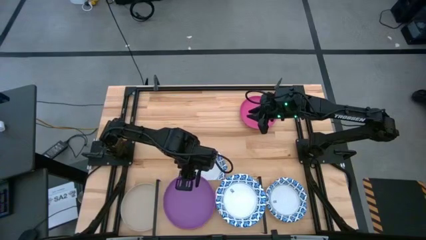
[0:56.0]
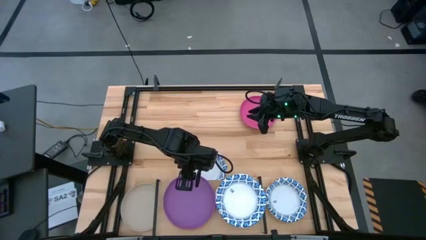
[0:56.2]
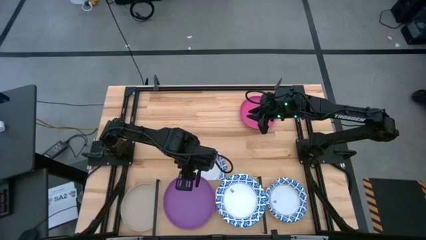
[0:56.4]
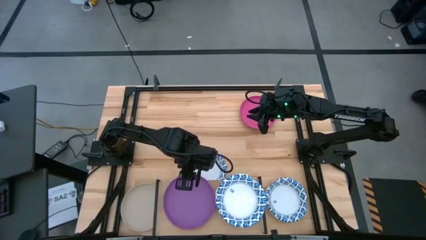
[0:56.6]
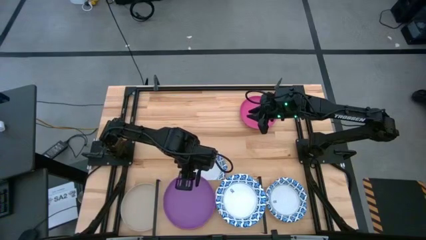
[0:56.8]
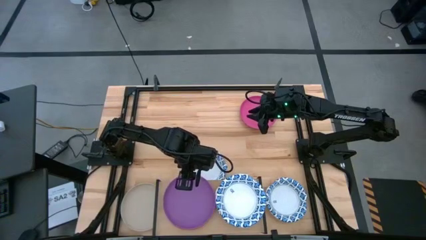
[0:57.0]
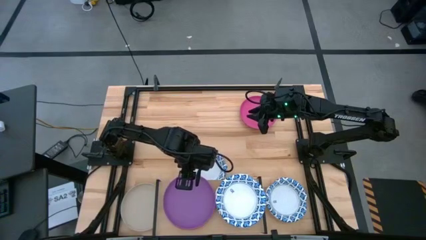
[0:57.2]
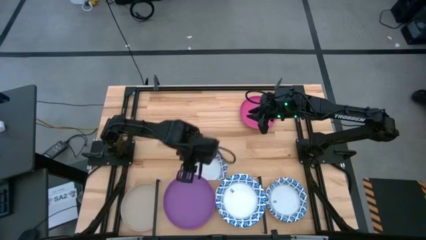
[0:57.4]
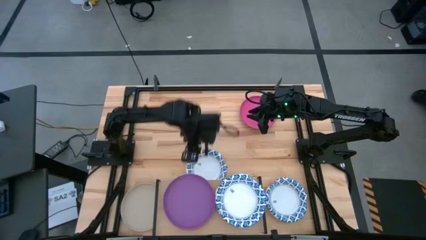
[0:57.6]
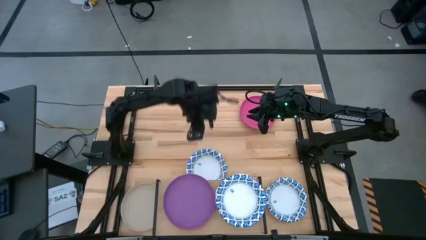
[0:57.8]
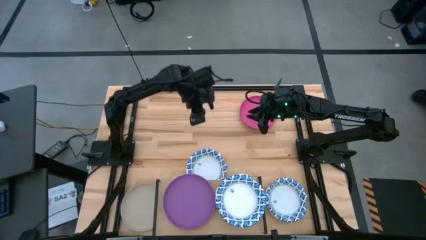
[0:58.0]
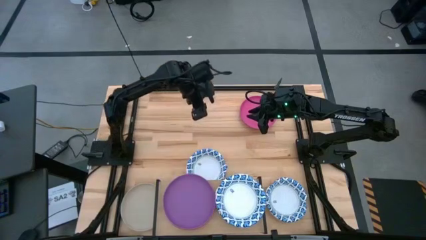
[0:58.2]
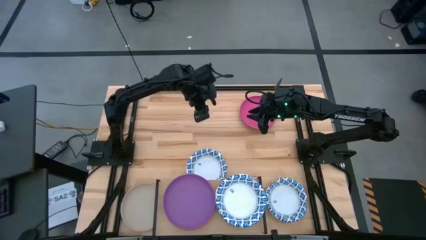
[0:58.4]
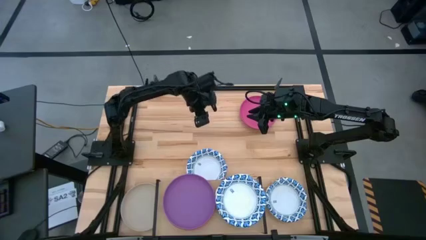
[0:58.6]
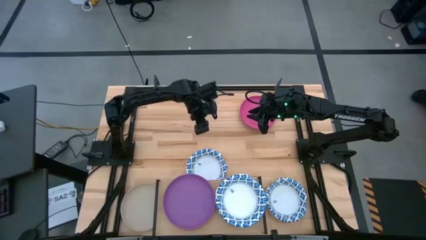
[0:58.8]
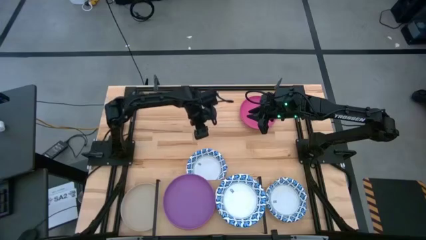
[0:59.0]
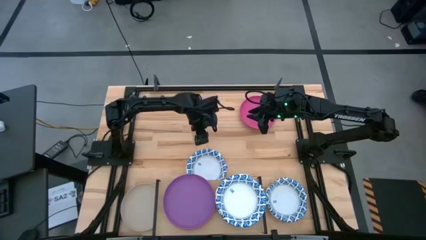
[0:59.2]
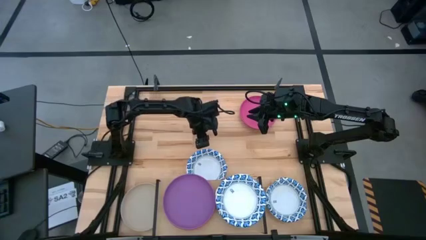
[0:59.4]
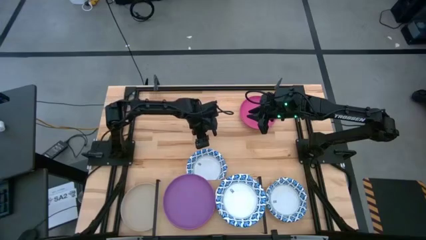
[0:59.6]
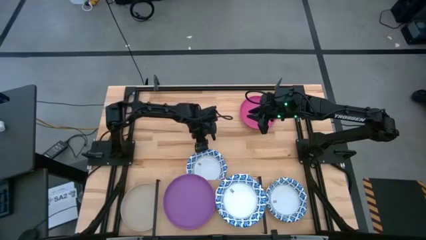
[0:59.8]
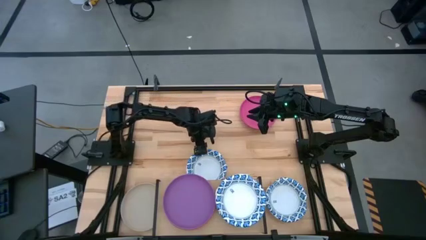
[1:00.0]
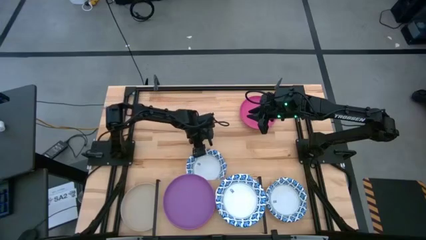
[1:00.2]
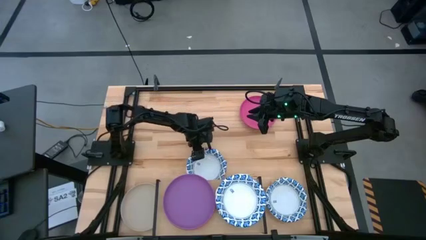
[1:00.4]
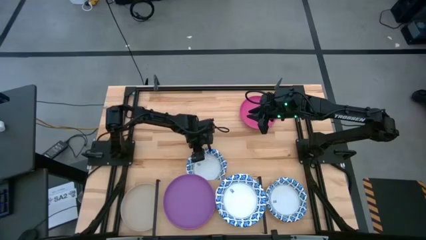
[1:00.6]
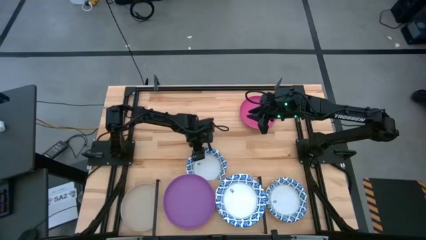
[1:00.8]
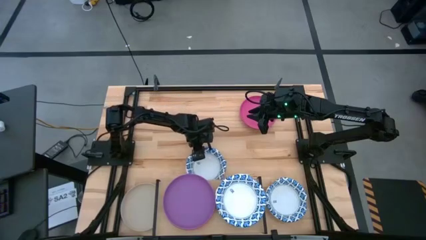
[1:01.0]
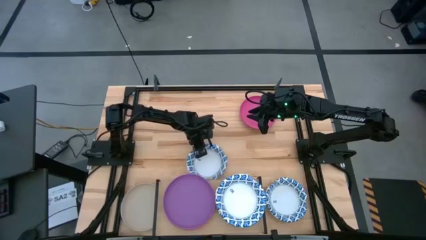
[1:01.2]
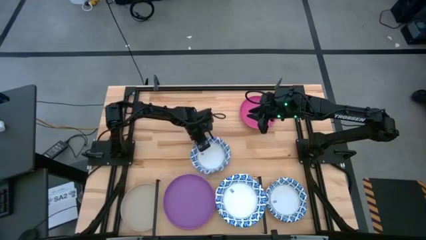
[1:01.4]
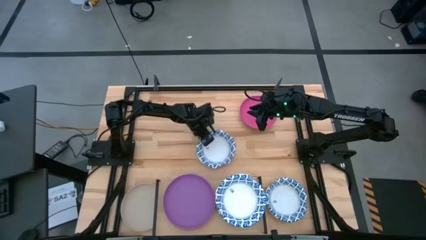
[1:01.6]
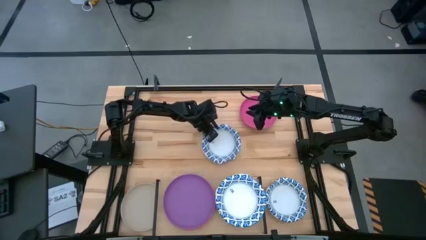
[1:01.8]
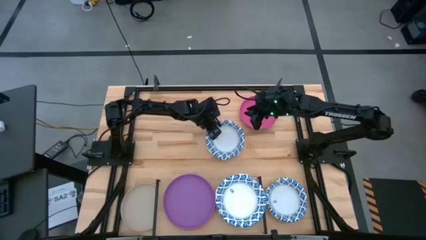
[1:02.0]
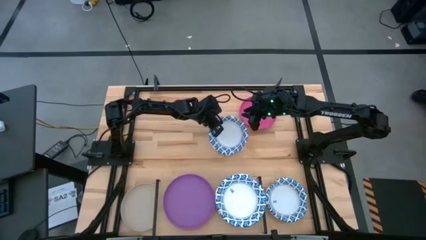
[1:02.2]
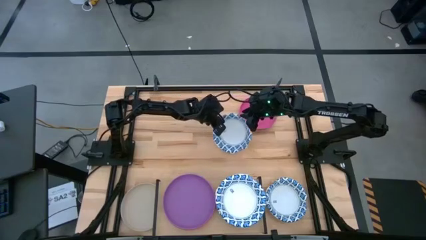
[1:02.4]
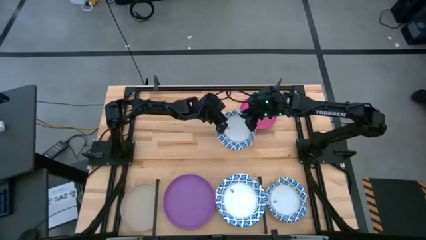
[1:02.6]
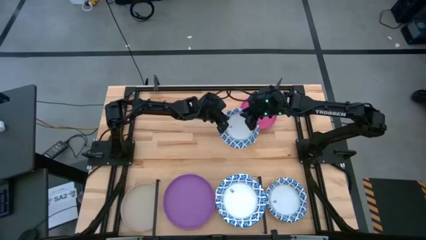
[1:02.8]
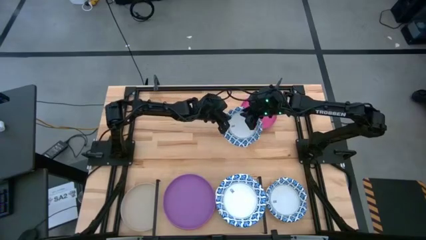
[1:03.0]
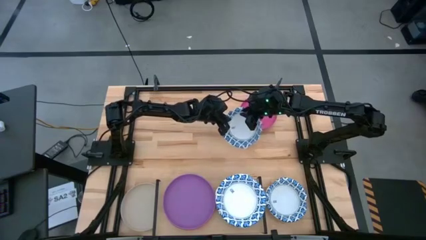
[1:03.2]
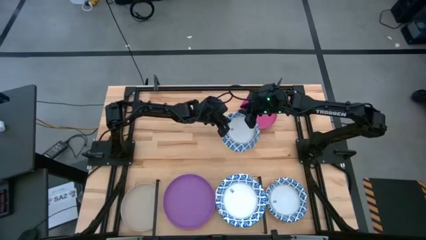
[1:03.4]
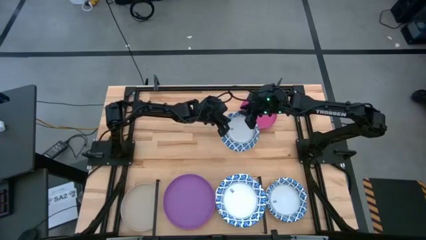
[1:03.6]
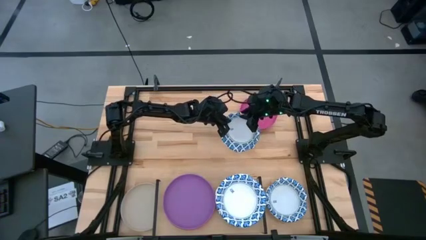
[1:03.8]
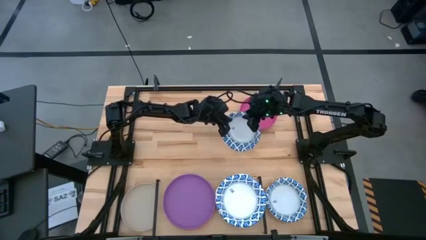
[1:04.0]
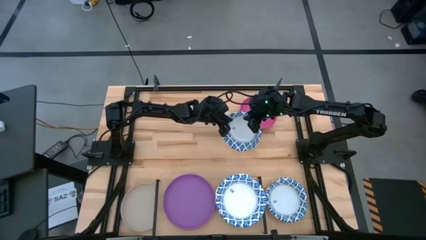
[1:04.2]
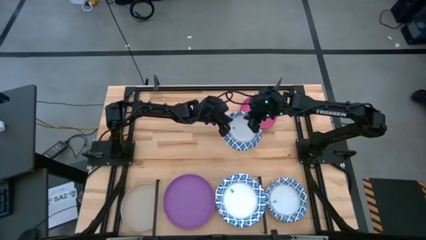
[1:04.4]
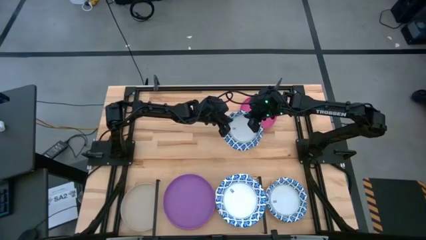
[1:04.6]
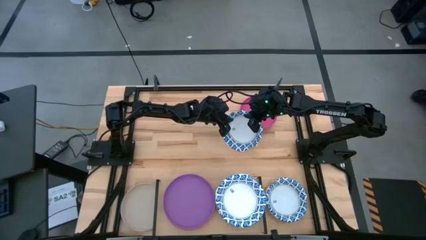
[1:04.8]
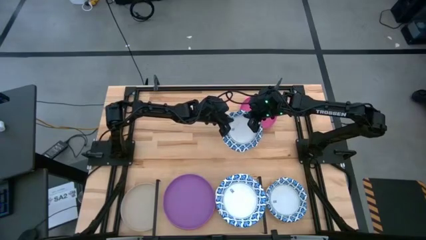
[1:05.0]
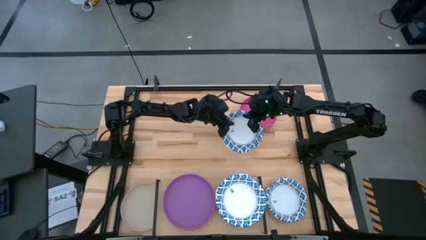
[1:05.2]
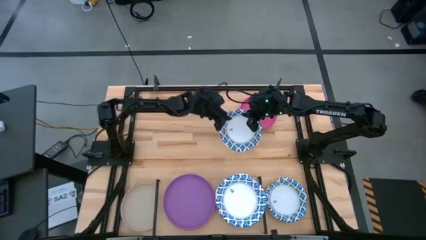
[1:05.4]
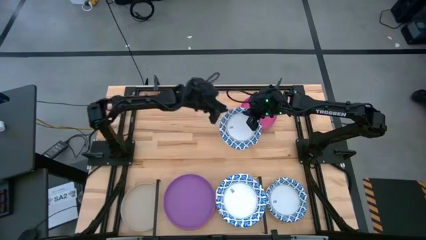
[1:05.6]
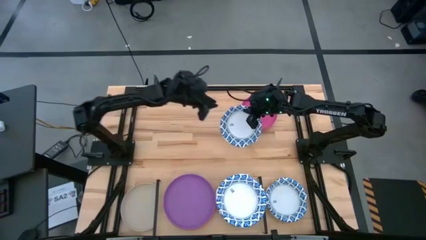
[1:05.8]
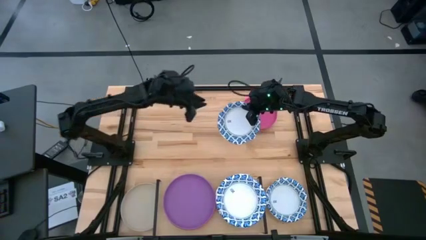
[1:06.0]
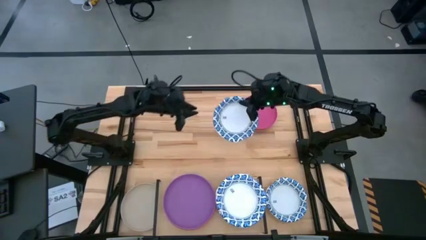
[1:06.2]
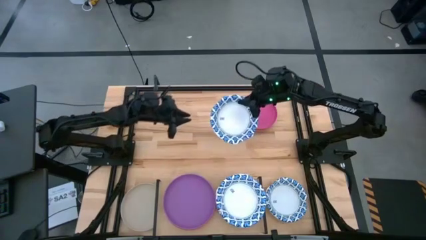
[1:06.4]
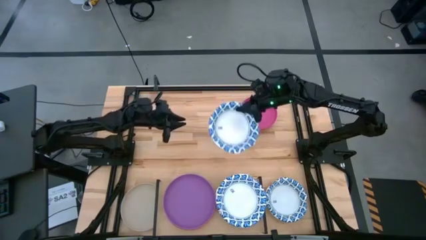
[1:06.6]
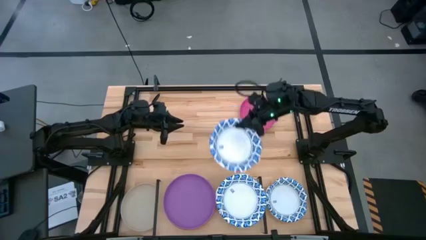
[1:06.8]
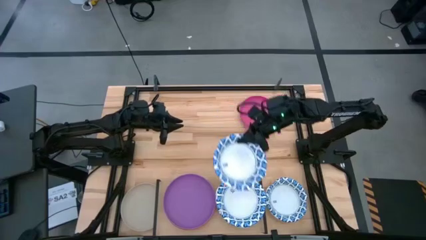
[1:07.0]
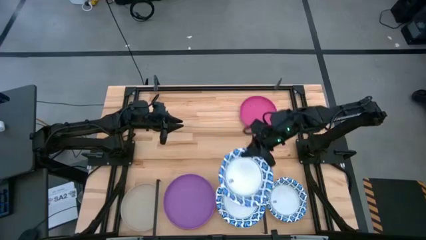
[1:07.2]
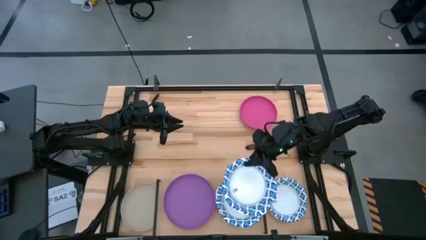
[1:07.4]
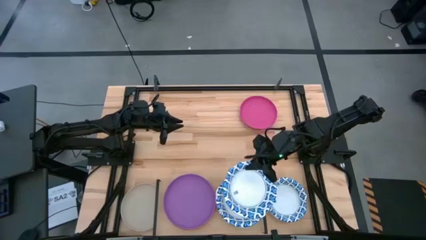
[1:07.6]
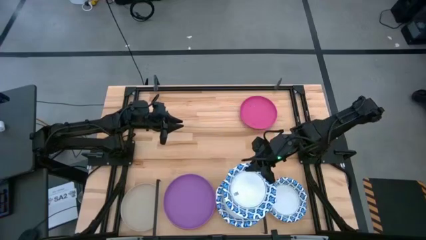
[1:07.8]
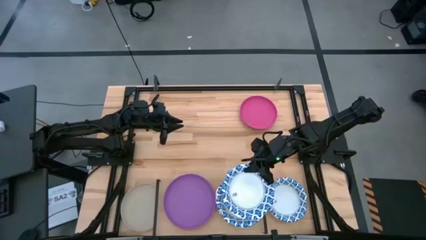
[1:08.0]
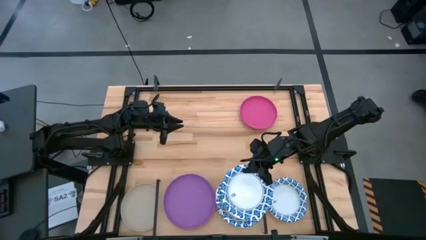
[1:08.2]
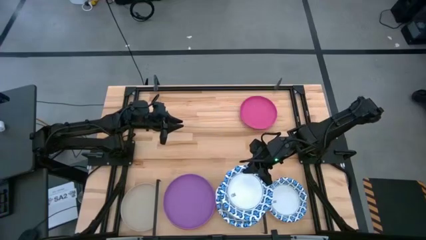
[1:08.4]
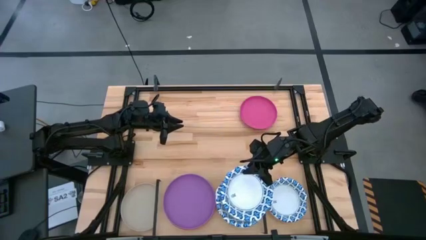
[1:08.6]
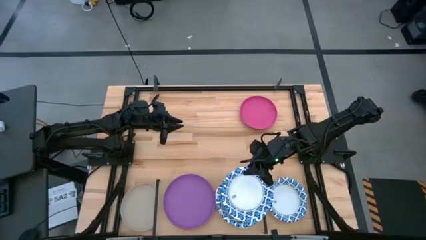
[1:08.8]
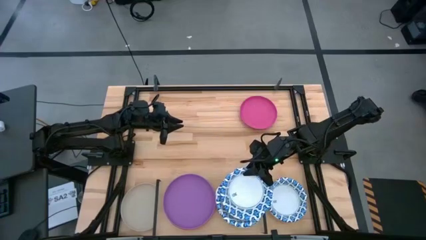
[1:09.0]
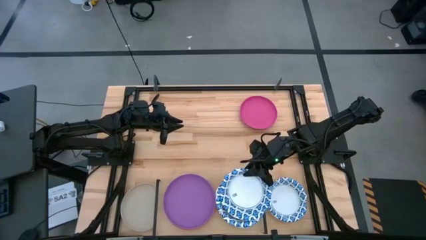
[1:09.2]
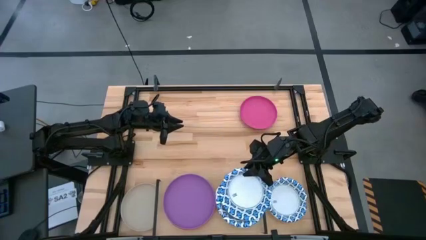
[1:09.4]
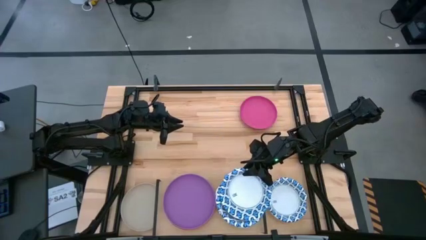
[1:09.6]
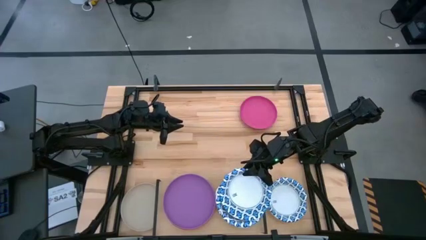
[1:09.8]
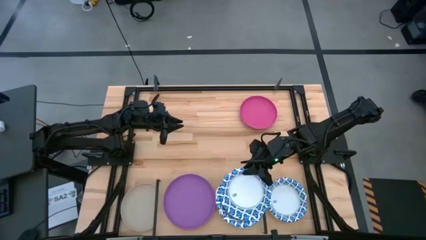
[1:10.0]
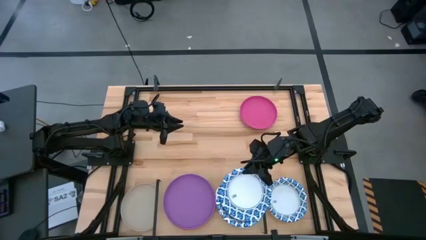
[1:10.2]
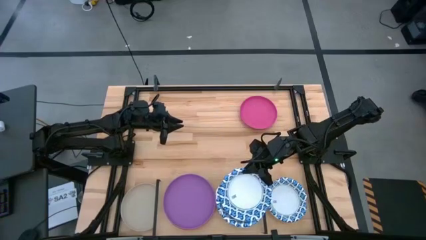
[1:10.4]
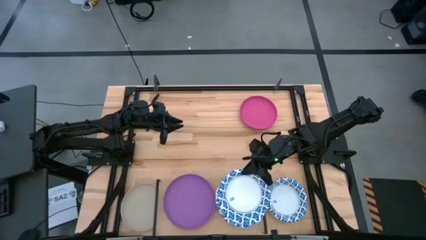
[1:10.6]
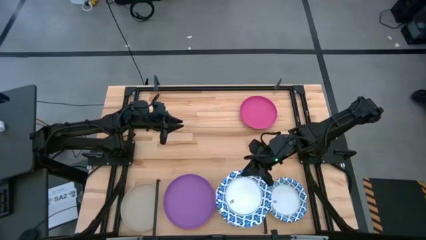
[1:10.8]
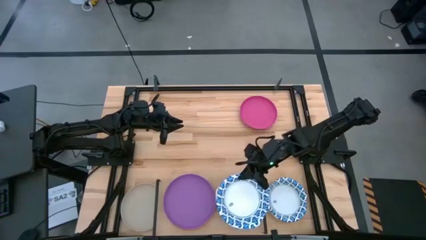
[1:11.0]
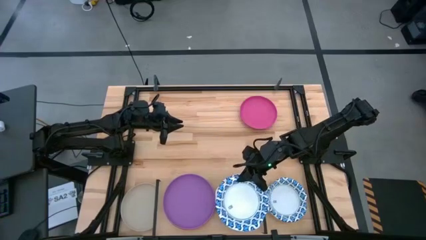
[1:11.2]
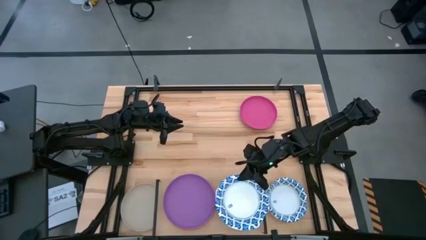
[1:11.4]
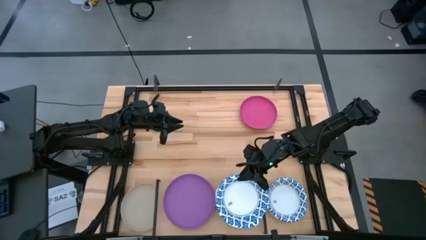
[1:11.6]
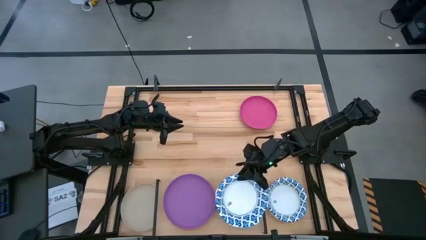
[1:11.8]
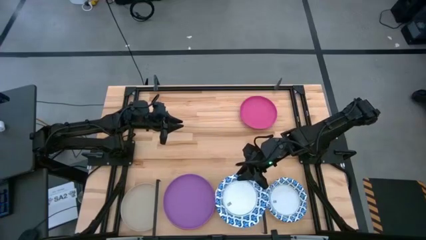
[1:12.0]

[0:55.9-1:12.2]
Task: Place and stack plates onto a shelf
Stack the white bowl on top of the white bowls on the shelf

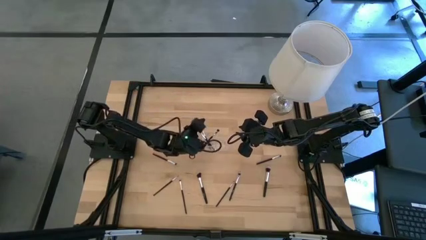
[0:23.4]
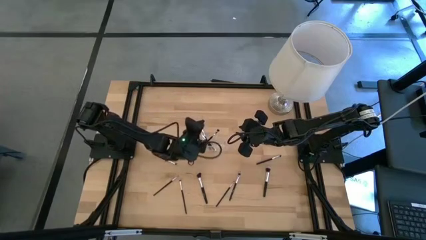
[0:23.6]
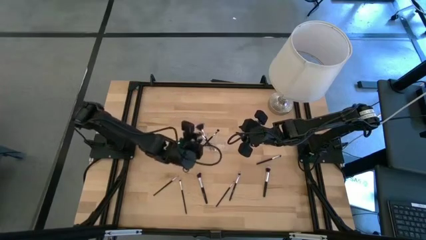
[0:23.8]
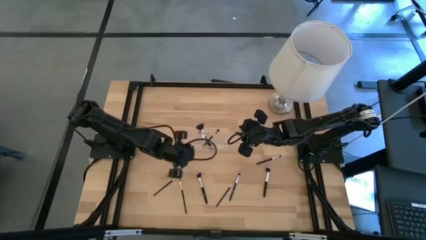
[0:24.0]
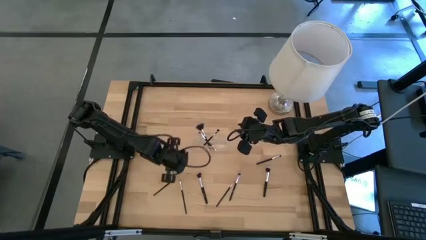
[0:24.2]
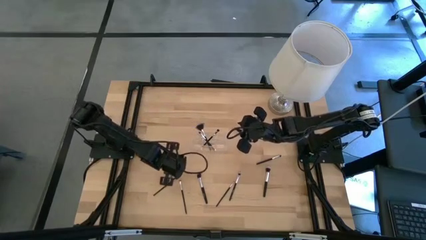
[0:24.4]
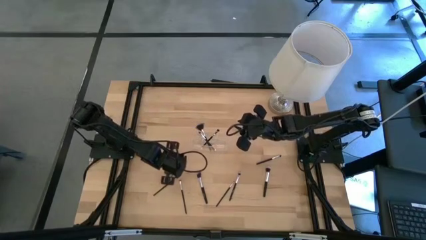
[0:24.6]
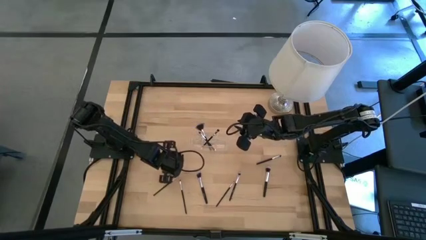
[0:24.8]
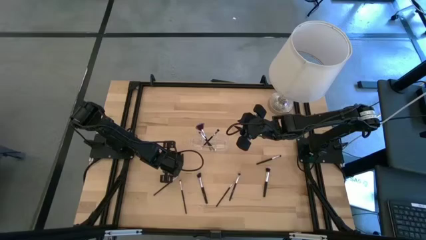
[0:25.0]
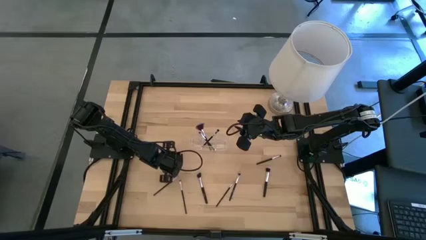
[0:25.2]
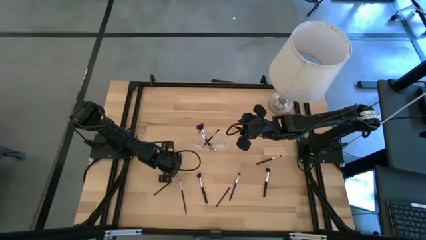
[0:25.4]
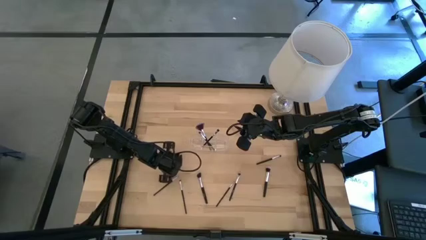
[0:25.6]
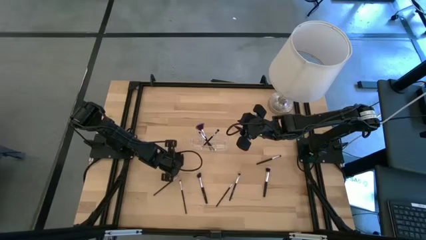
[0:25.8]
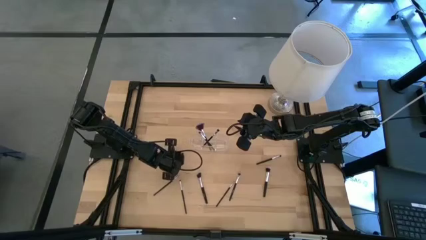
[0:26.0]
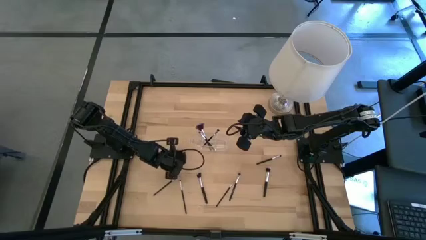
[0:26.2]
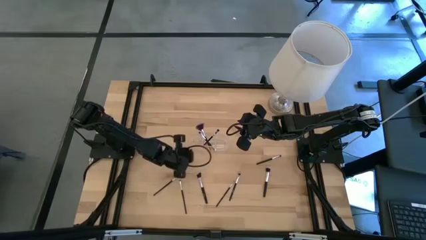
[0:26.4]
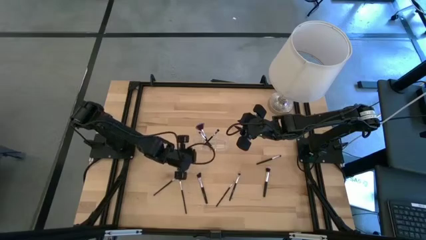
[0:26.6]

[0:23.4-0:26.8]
Task: Put items in baskets/containers
Put the blush brush into the transparent organizer
